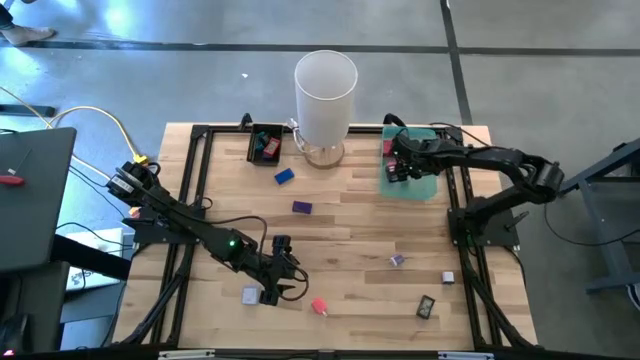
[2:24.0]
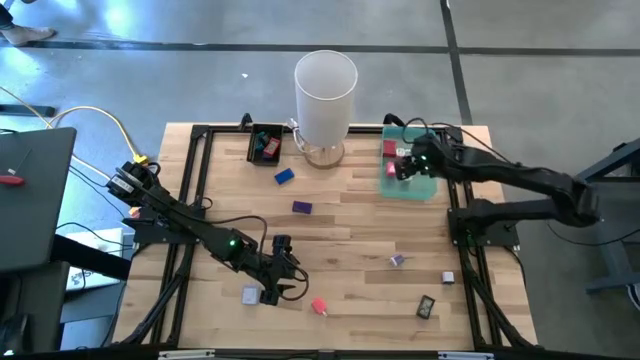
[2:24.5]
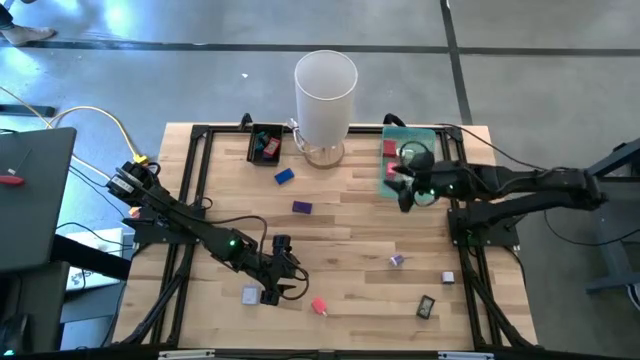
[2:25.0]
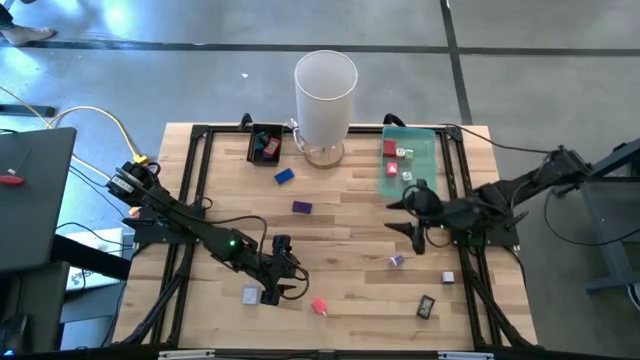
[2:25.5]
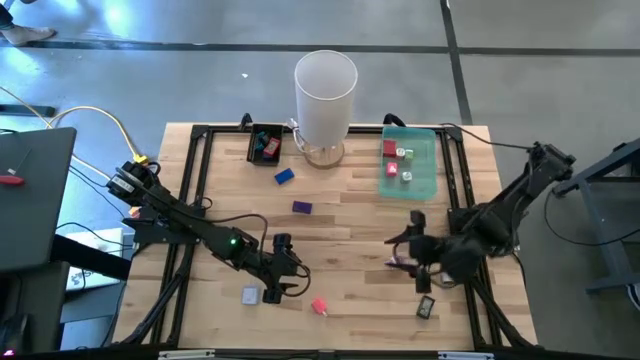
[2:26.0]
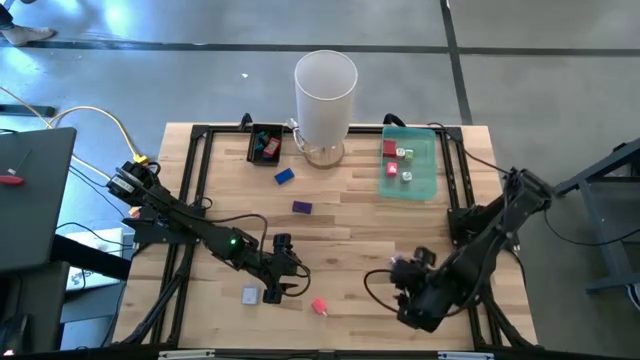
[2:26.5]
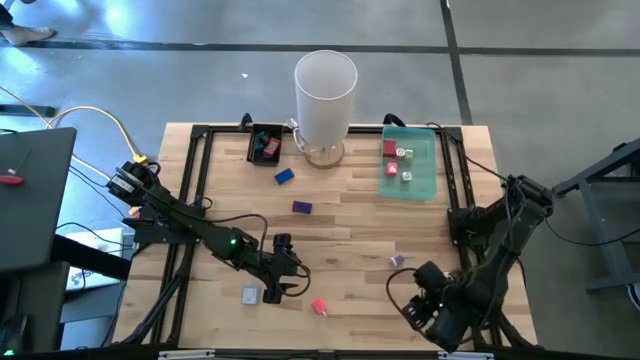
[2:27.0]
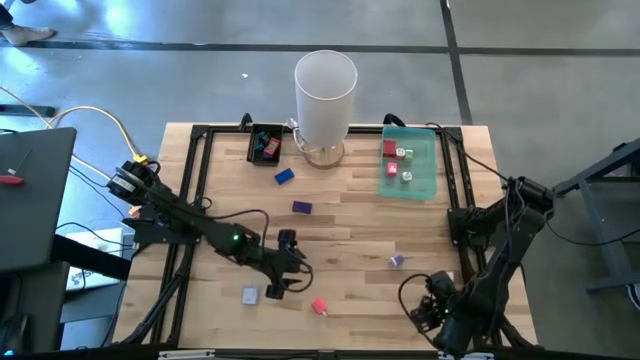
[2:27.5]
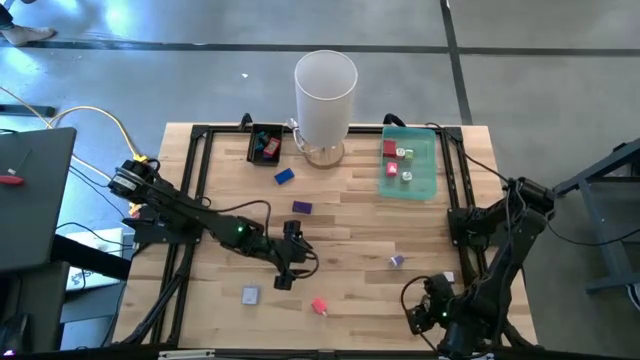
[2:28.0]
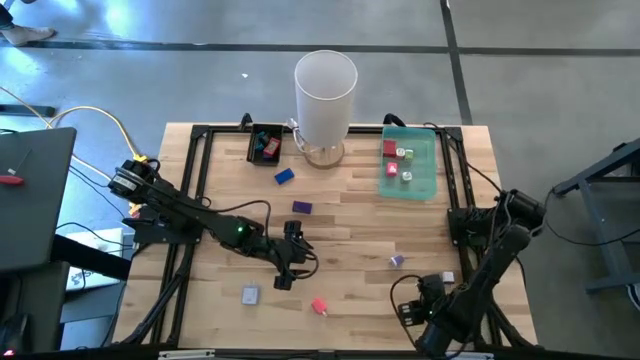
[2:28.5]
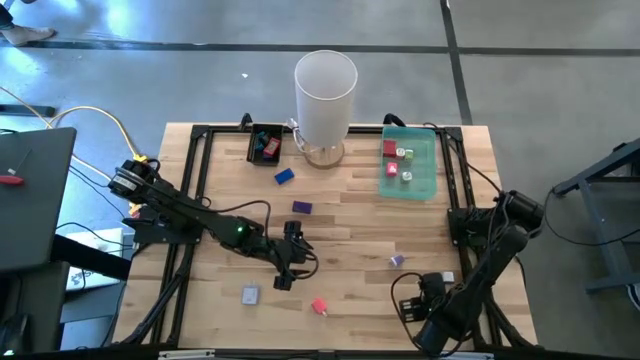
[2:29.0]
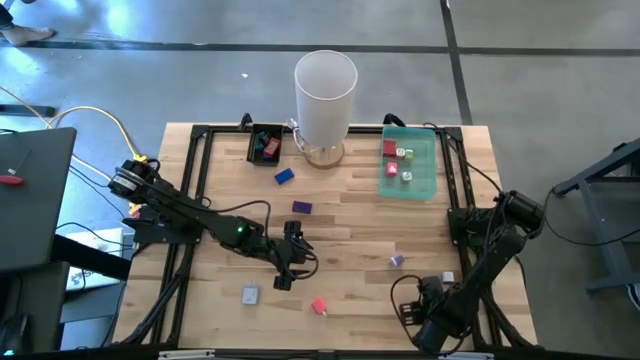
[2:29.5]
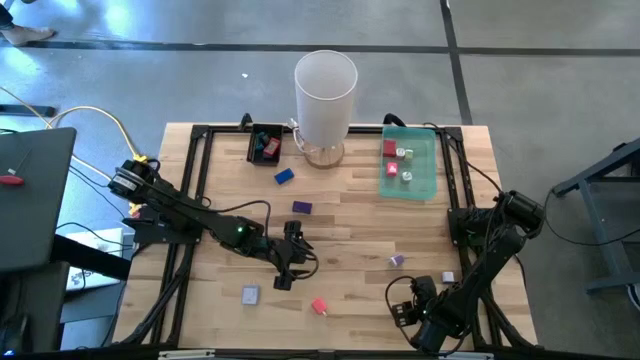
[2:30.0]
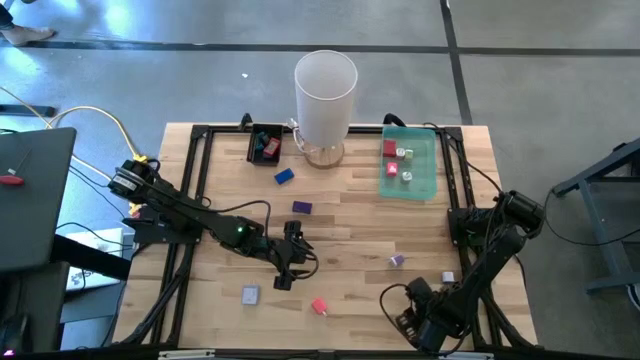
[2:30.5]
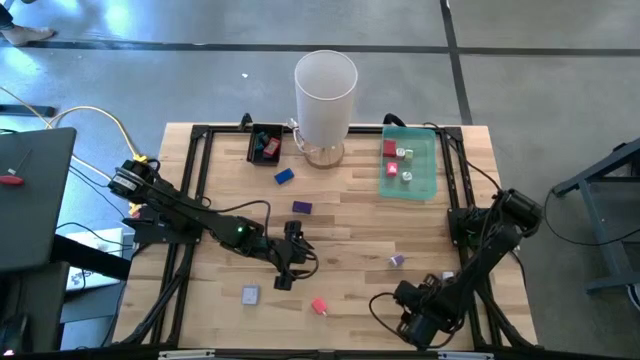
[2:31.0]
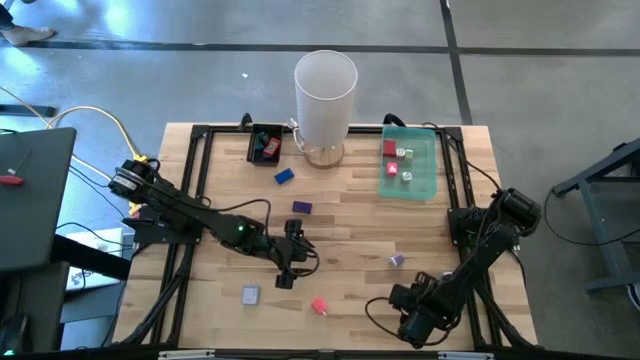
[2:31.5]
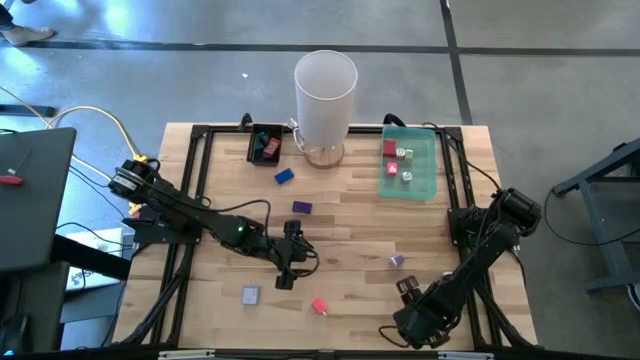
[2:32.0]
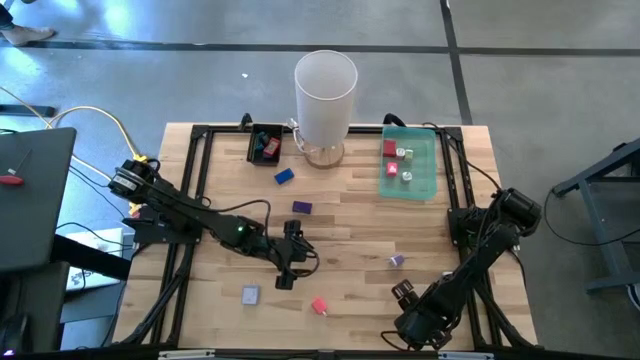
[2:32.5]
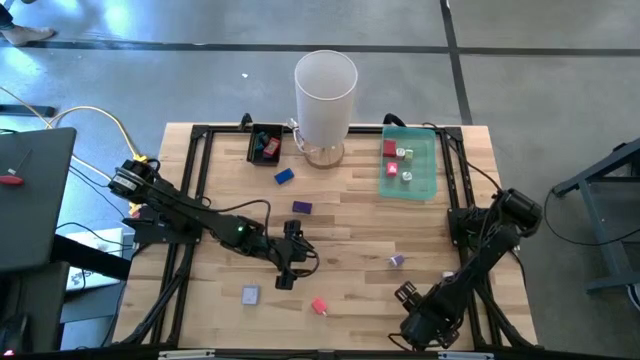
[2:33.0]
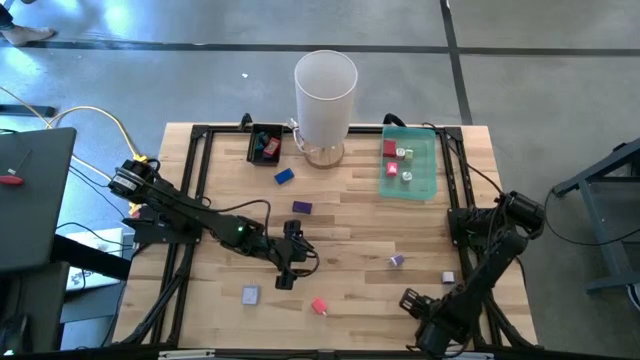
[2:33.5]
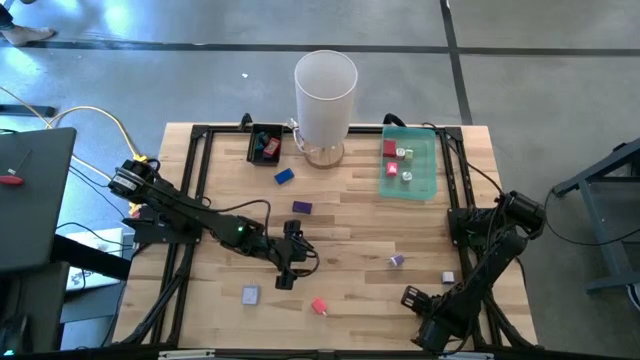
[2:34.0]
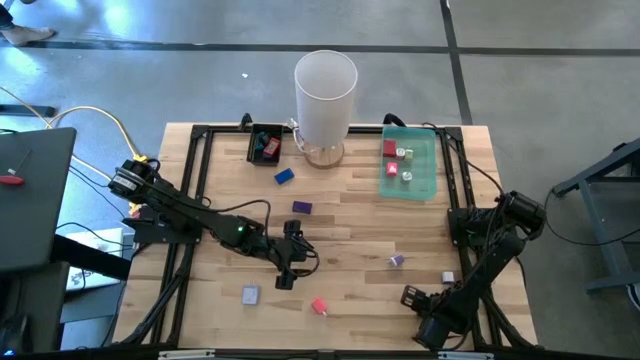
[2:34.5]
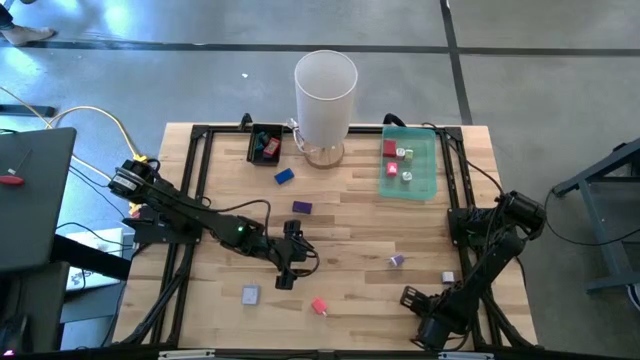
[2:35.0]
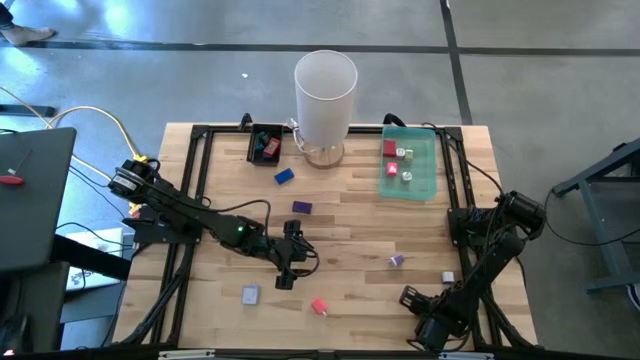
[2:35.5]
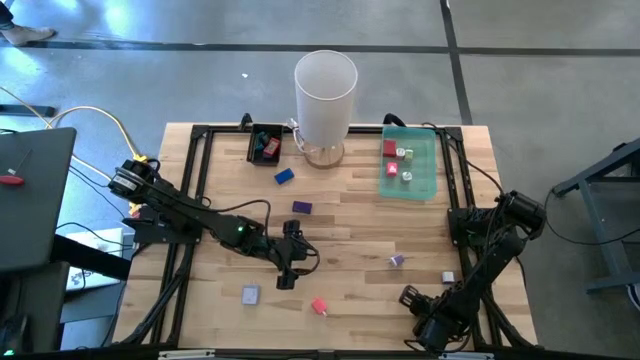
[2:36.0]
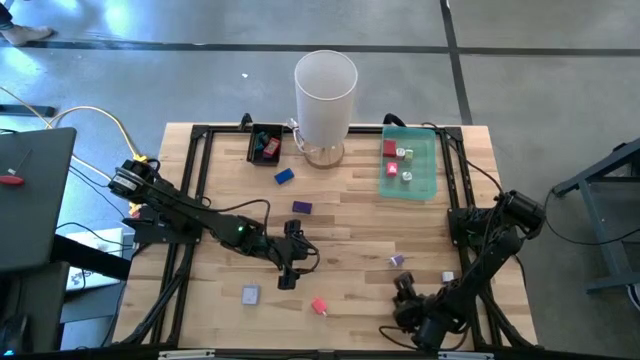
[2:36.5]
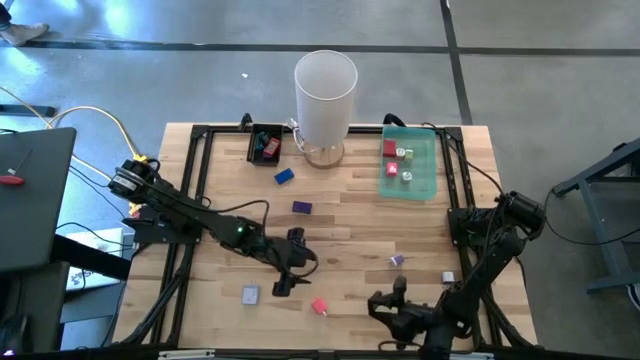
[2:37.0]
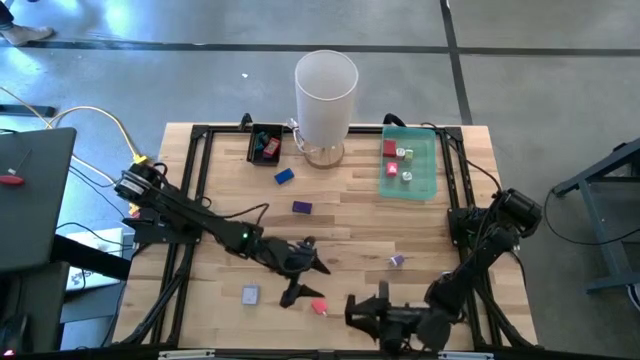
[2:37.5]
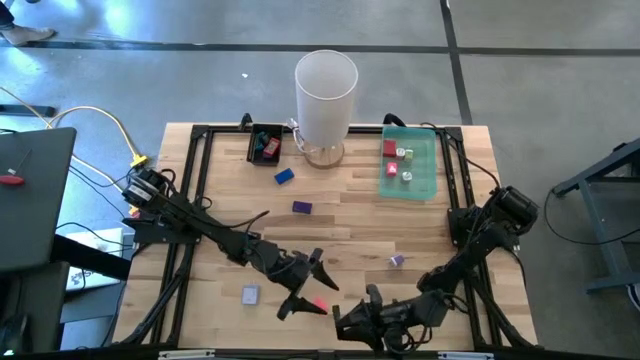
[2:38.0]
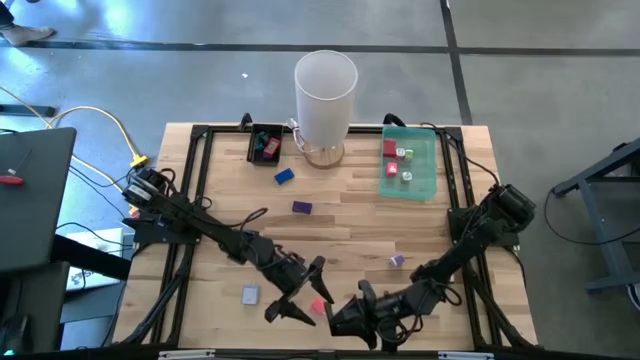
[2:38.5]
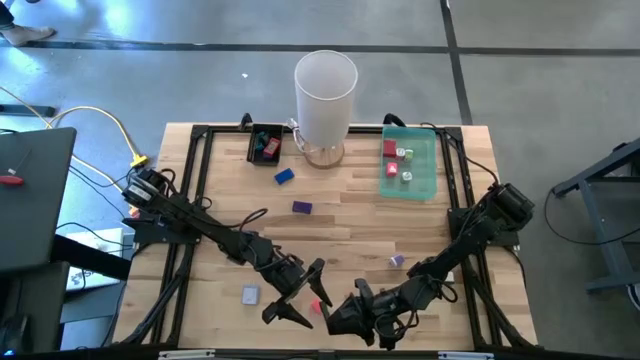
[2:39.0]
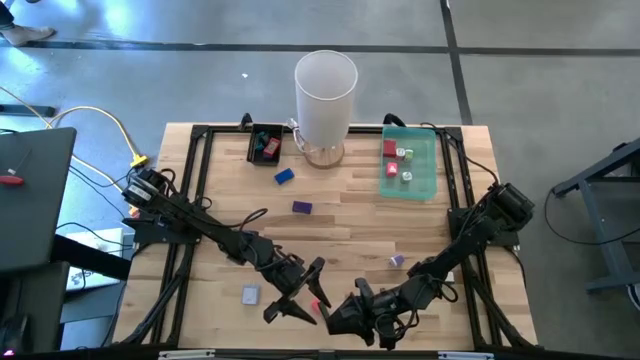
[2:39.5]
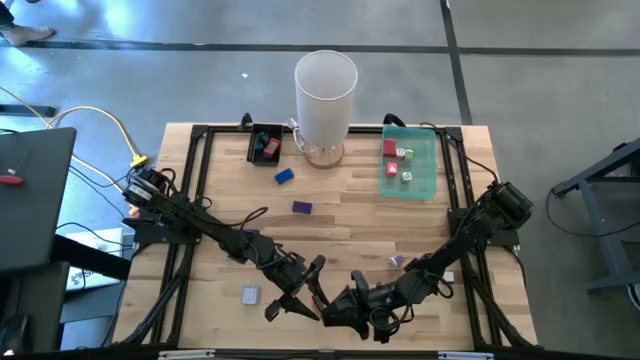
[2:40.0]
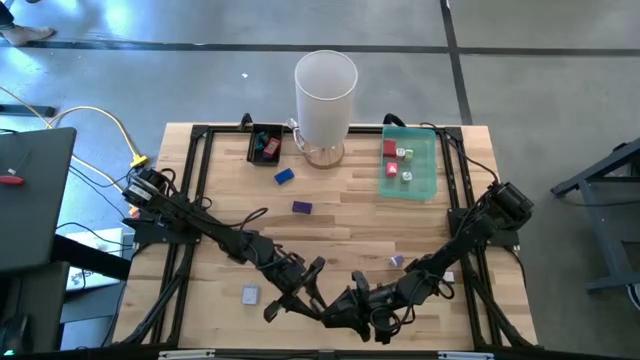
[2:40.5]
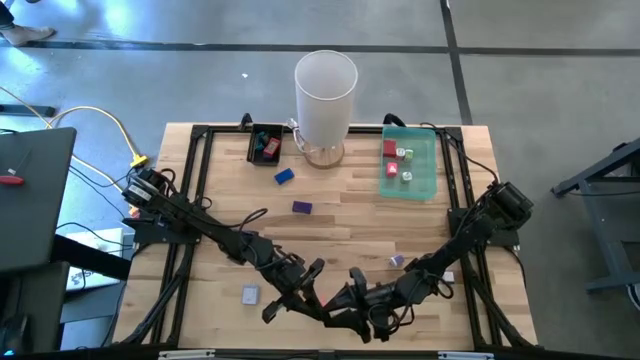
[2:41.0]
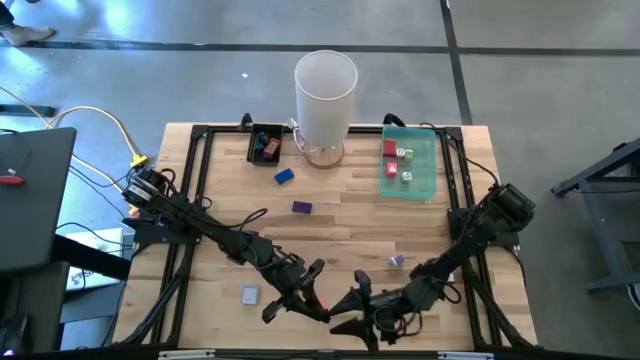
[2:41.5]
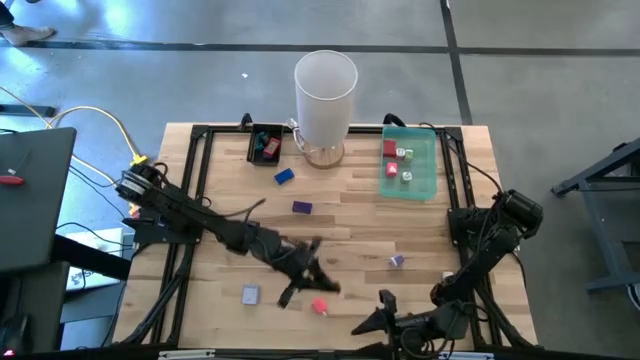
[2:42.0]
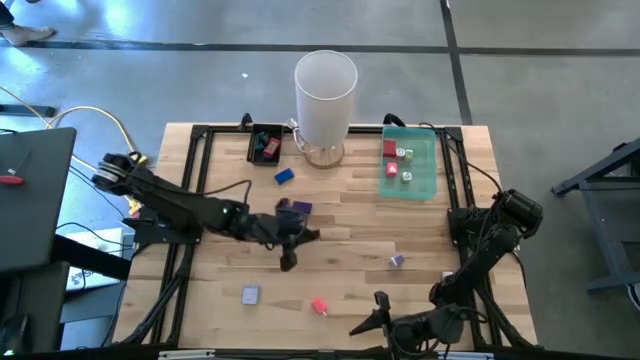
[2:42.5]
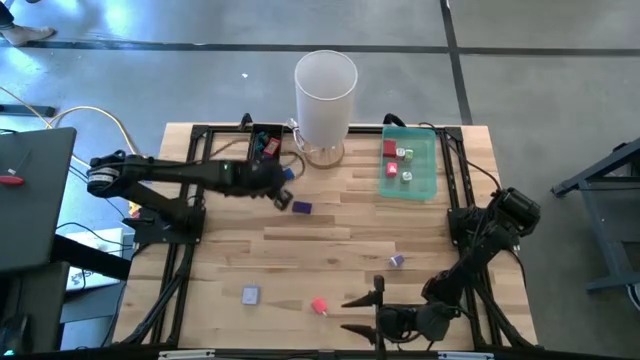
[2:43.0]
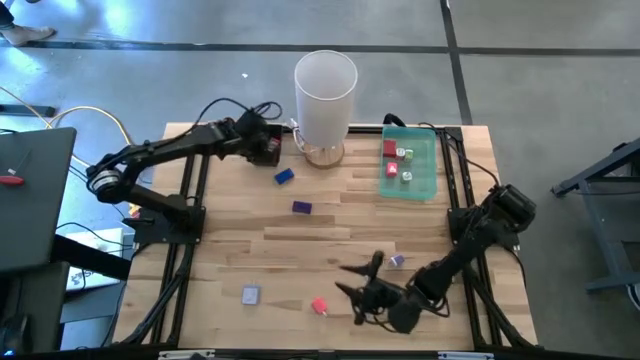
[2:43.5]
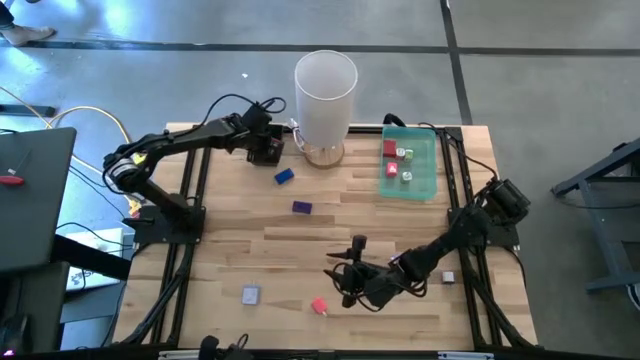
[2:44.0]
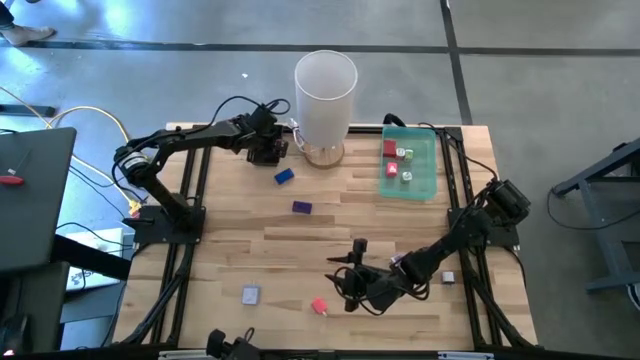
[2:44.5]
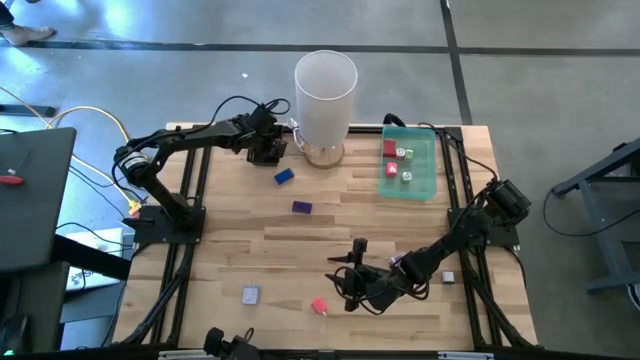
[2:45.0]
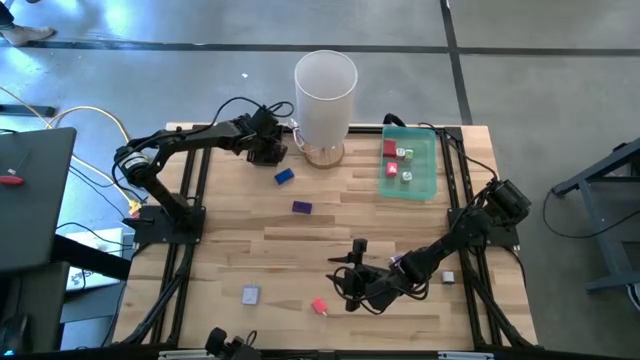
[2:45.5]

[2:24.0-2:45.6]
Task: Pick & Place Office items
Put the black digital clock into the black bin
